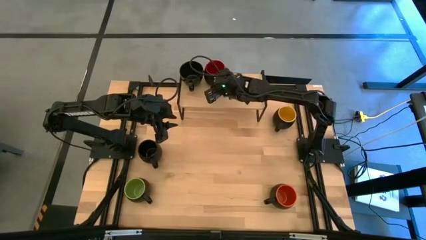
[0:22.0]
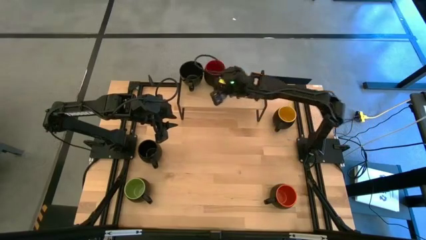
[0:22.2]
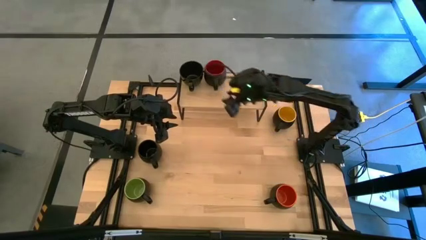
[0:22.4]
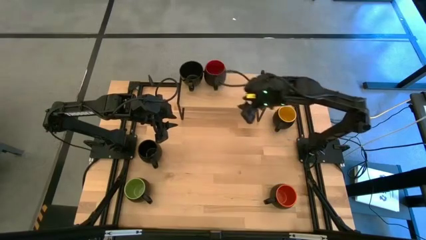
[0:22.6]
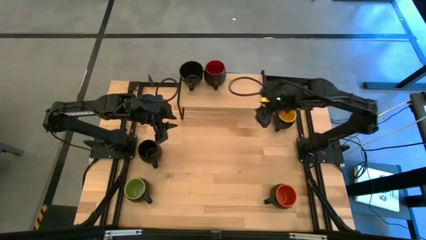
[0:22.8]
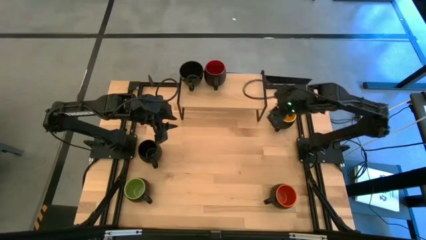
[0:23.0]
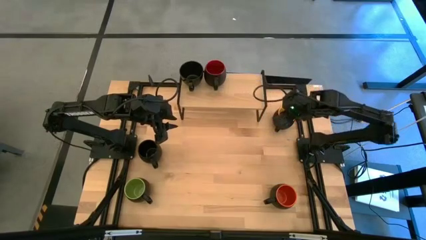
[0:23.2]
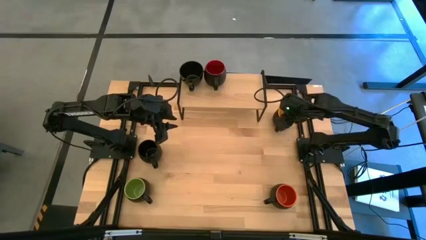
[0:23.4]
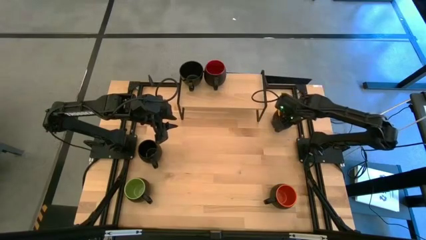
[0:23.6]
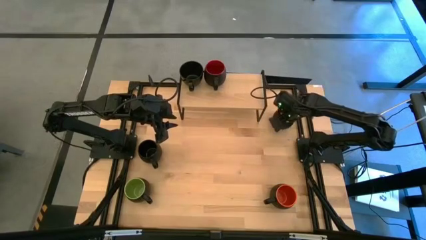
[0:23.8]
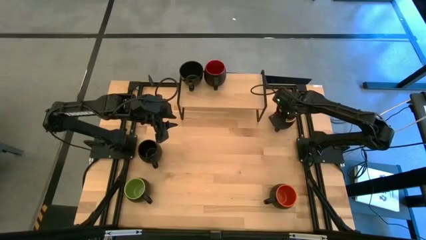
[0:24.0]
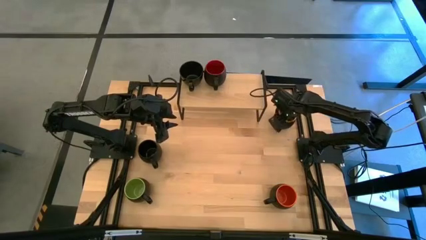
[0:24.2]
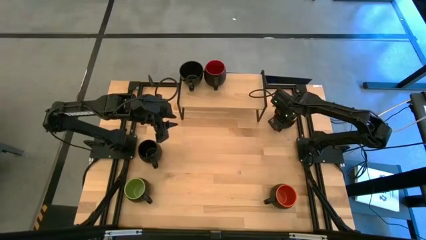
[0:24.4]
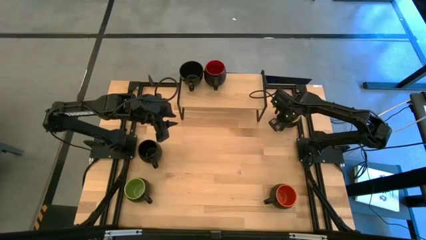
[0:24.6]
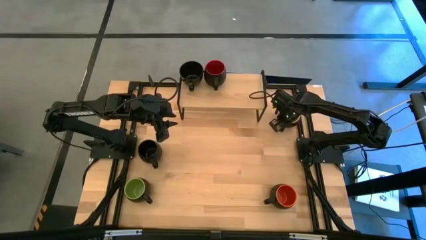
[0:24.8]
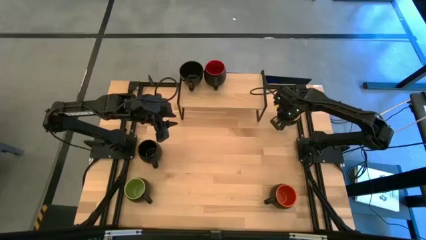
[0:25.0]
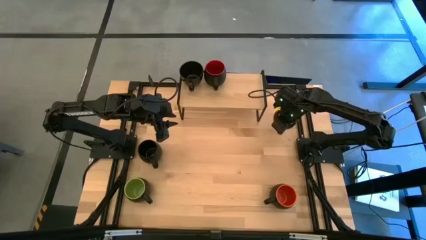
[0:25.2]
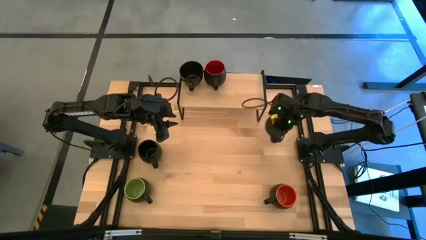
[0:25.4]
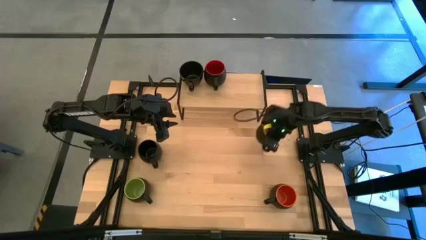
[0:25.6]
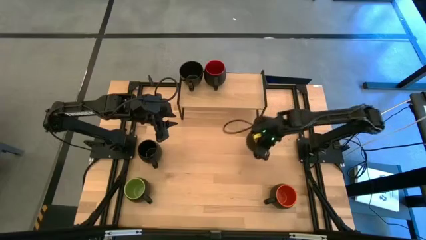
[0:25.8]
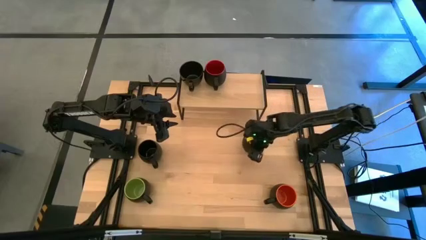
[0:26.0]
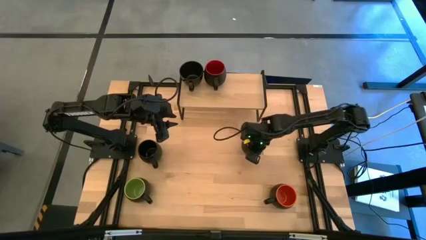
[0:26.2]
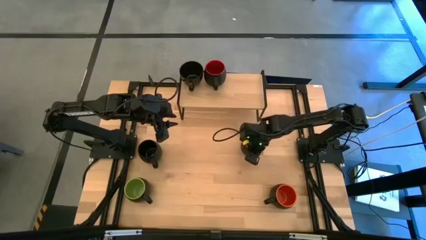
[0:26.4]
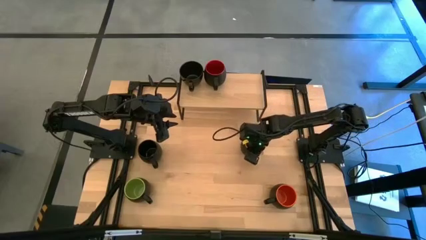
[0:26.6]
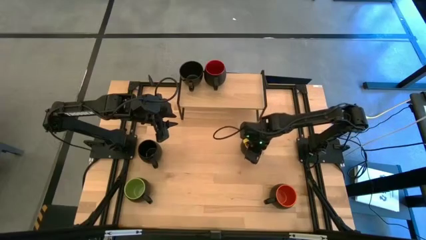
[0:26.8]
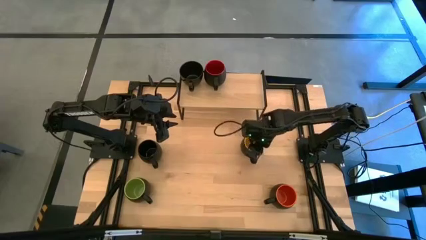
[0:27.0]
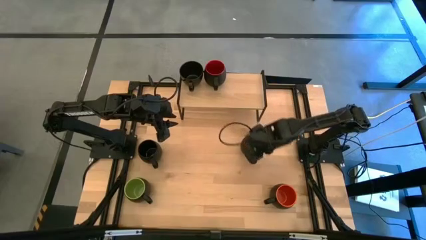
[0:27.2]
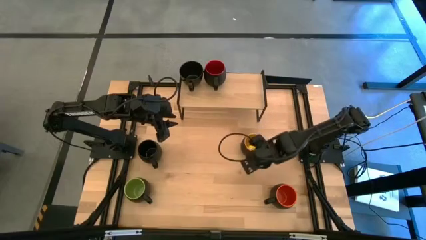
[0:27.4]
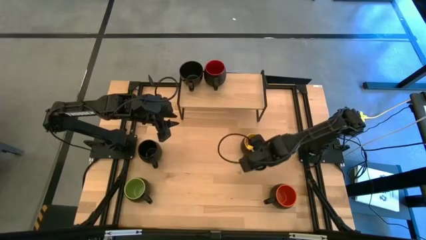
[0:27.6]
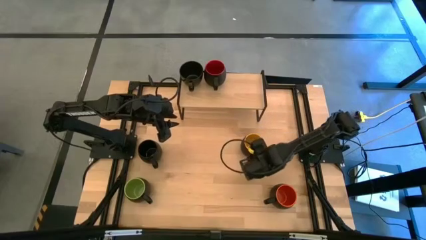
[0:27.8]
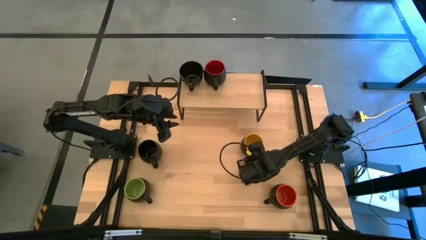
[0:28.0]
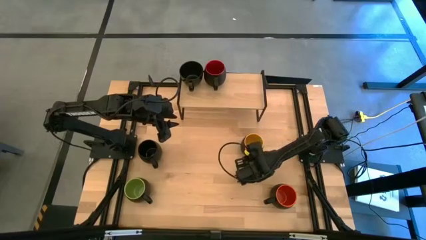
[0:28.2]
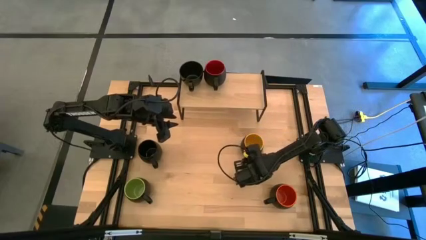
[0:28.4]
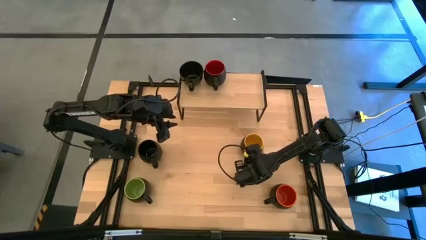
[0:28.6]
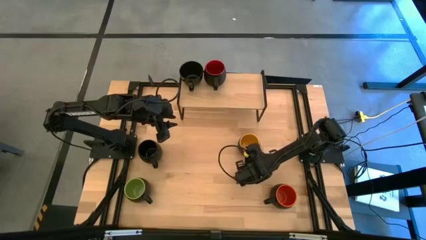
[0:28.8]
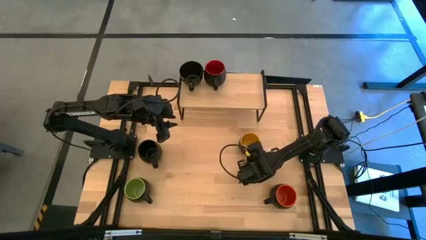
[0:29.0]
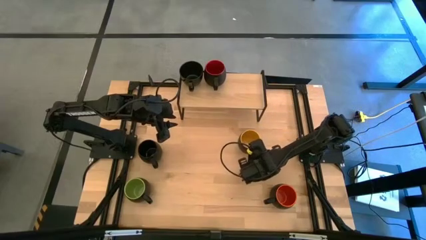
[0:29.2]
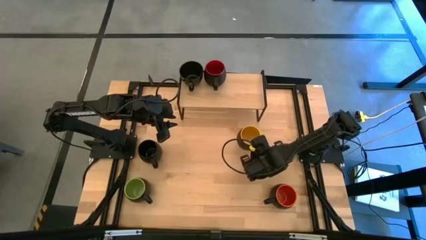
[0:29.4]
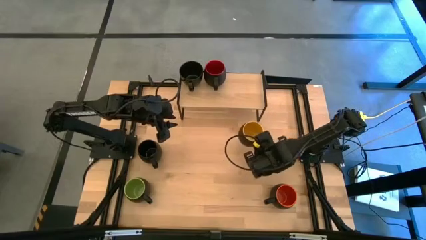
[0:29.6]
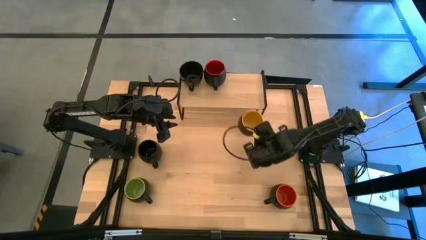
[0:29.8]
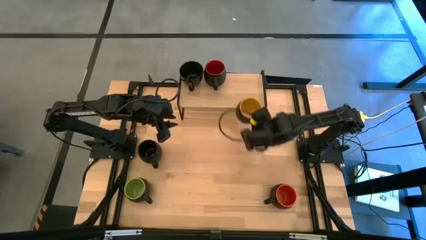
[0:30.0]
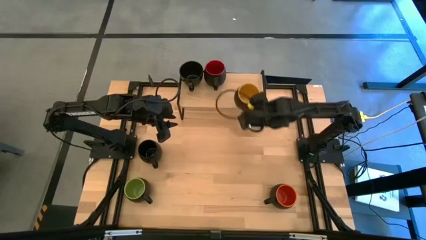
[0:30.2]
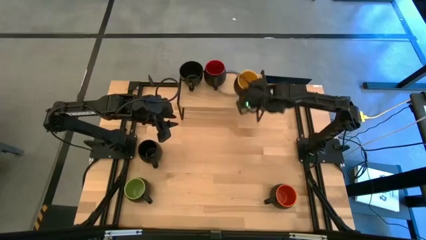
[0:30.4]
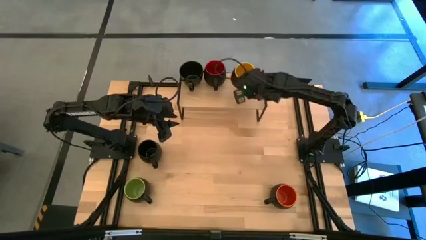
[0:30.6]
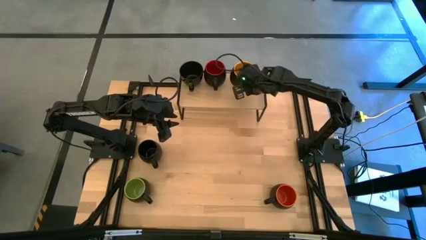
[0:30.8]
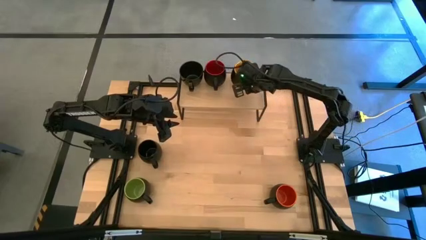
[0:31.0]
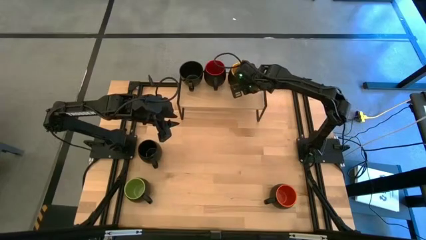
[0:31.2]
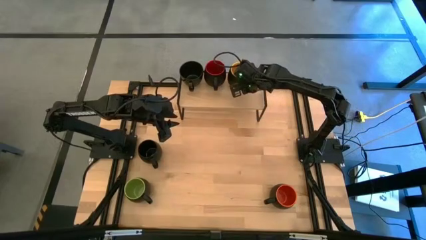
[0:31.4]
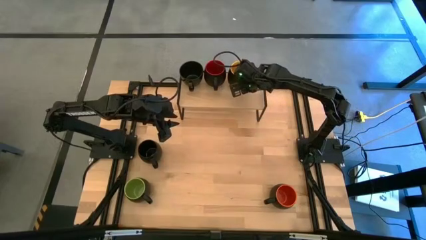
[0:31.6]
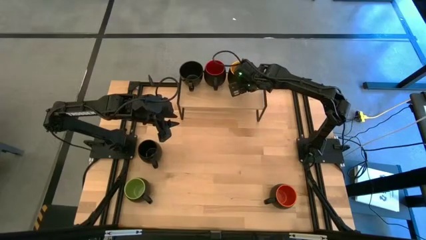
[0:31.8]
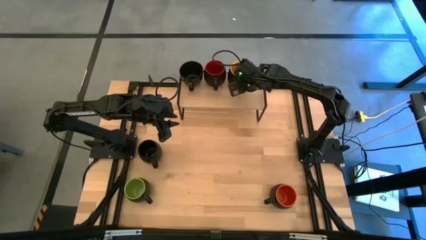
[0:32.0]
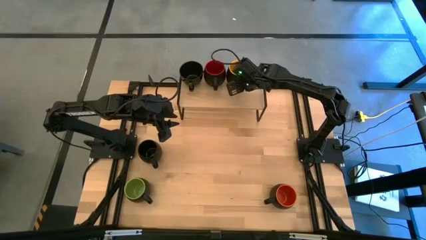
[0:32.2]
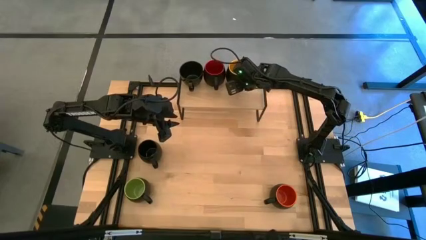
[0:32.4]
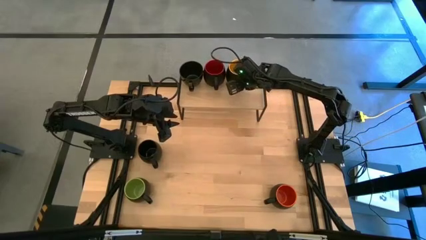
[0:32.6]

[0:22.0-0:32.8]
Task: Place coffee mugs
Put the yellow mug on the shelf

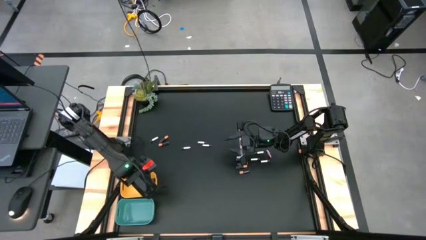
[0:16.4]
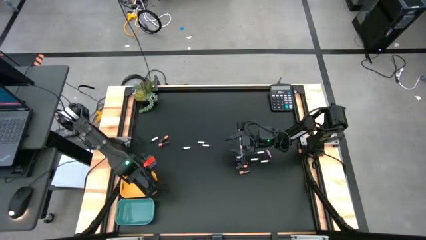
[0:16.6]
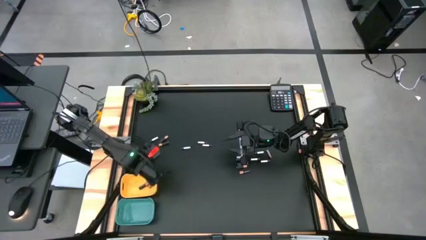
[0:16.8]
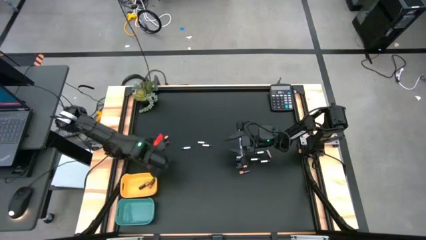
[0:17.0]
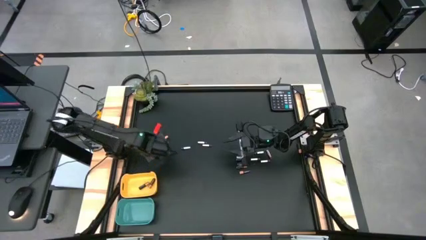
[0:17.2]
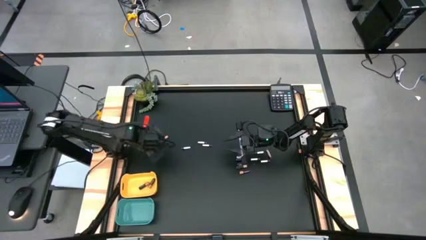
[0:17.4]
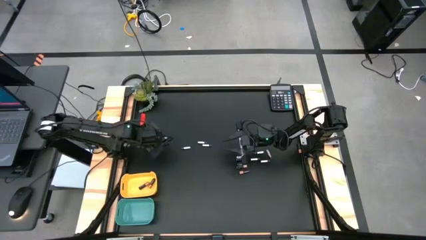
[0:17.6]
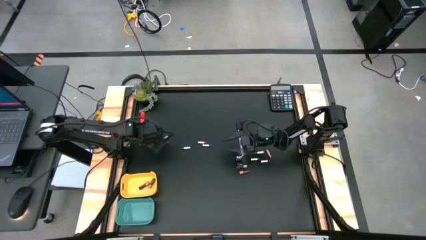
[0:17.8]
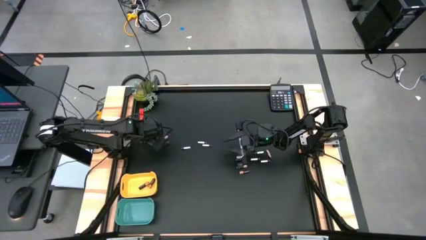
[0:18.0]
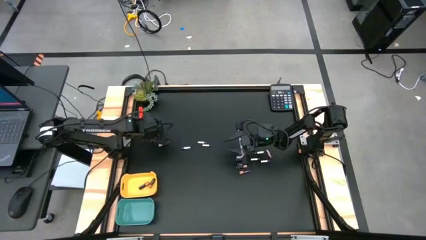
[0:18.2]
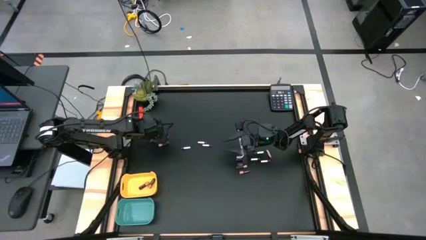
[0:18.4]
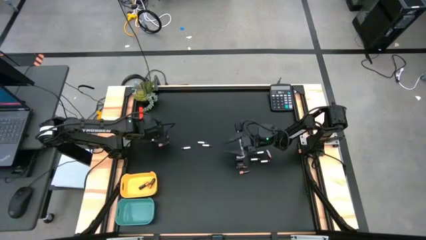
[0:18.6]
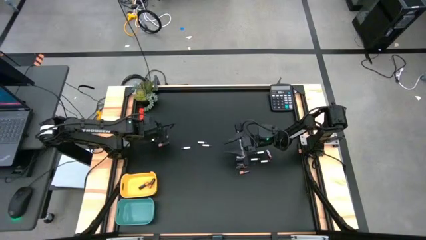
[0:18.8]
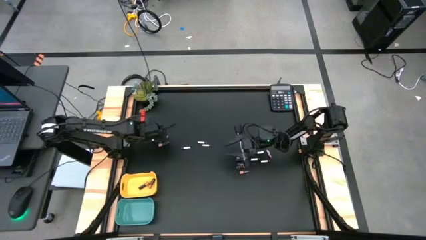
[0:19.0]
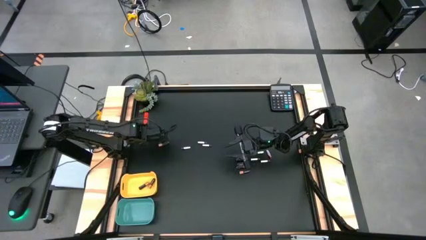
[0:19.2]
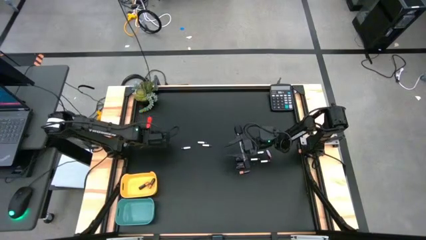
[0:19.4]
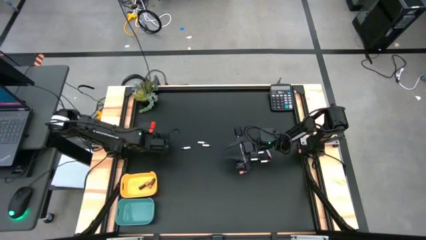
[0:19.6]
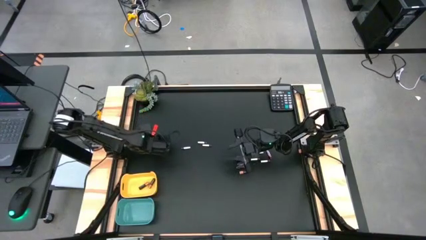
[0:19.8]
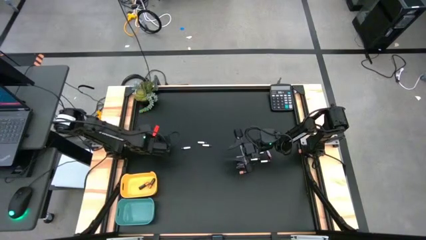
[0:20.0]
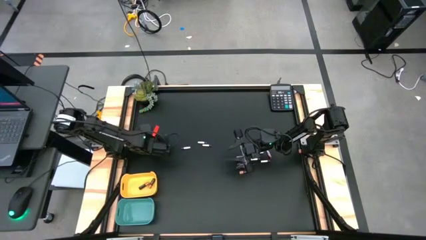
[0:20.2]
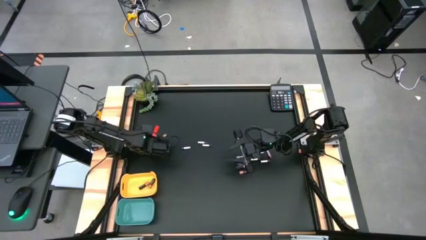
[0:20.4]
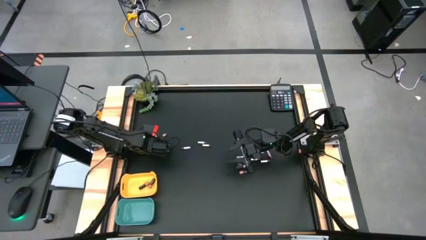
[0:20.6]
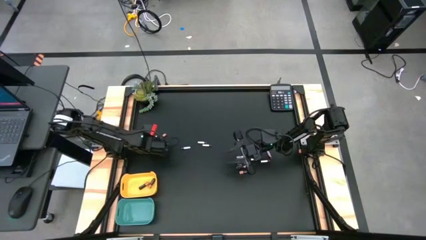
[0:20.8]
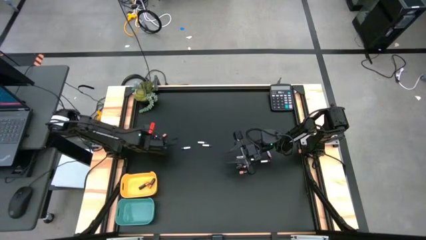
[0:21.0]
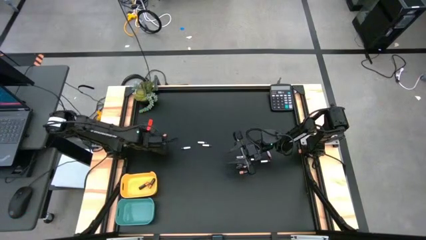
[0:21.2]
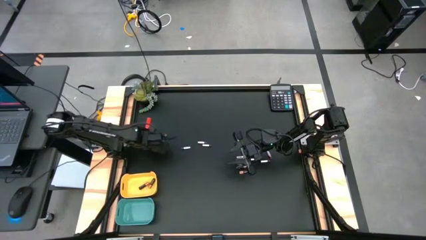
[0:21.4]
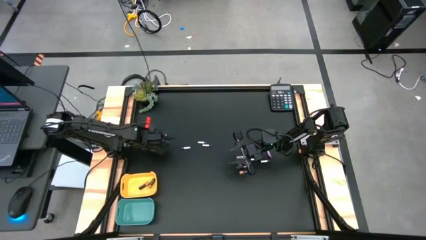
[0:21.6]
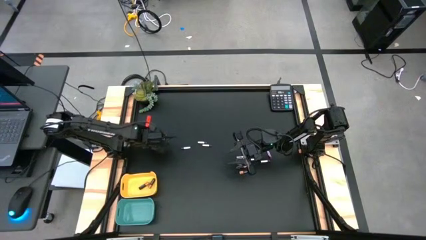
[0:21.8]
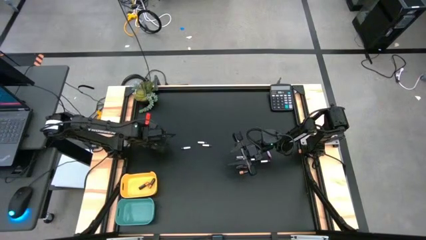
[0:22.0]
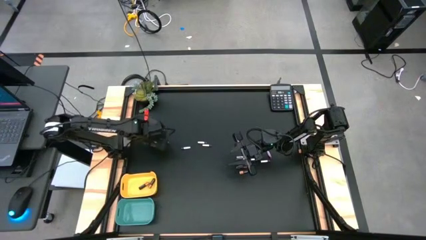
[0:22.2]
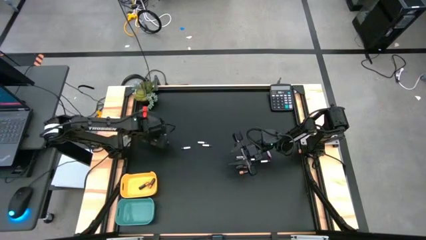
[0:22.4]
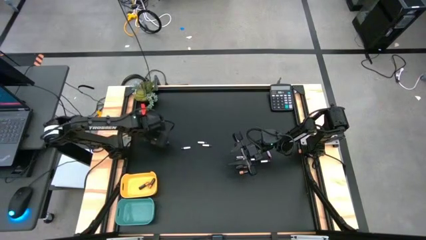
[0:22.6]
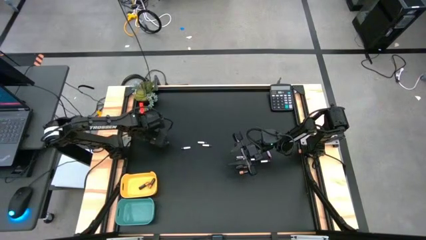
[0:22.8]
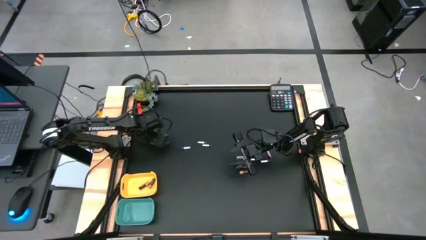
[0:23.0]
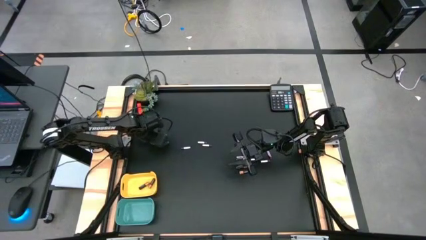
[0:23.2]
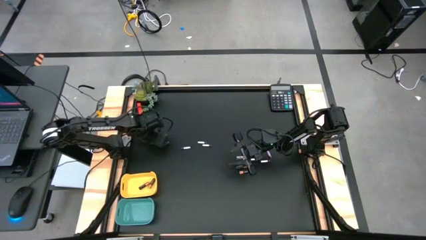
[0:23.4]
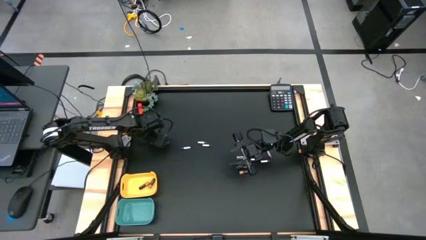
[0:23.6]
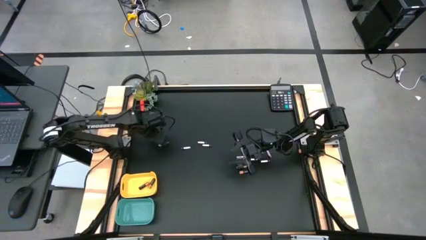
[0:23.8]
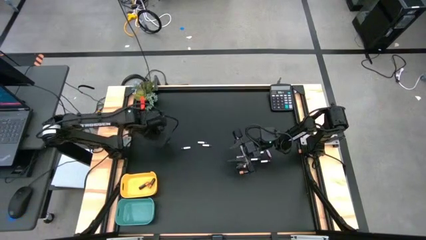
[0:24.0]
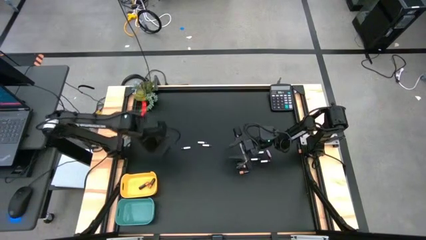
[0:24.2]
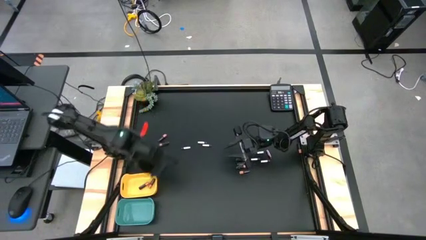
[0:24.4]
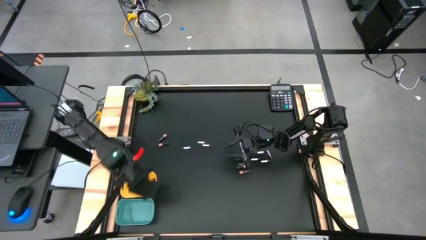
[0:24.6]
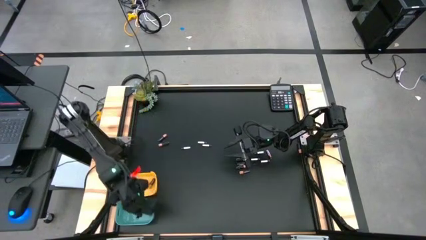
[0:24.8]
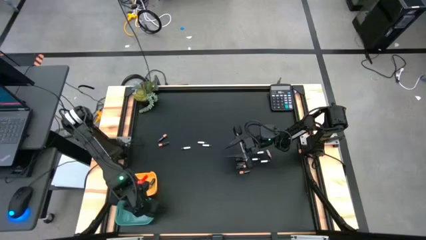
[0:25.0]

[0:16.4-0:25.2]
Task: Sort batteries
Put the silver battery into the green bin
